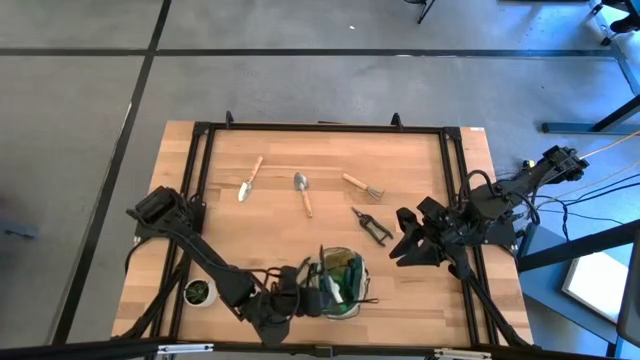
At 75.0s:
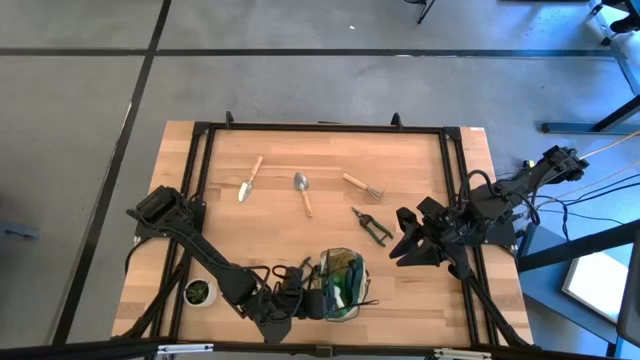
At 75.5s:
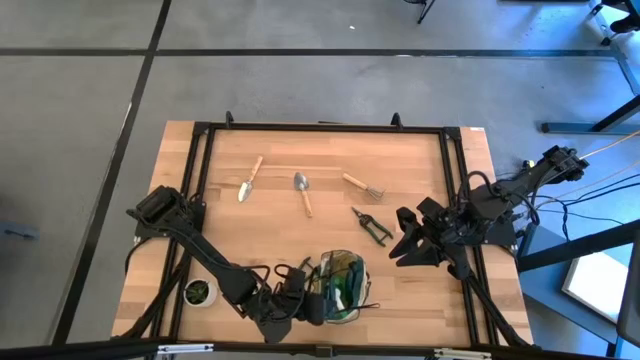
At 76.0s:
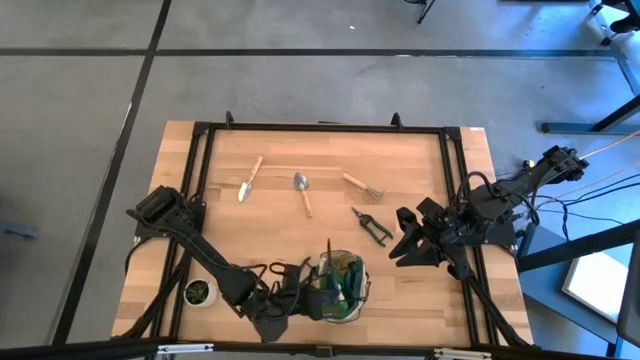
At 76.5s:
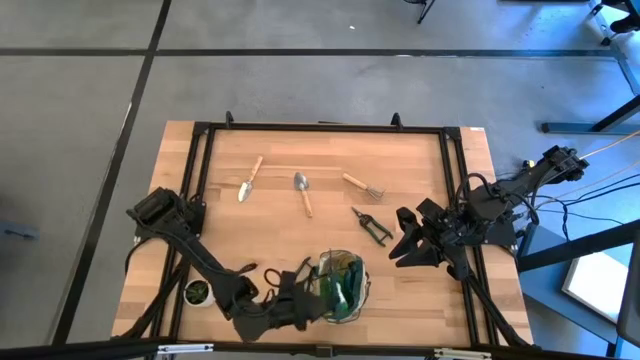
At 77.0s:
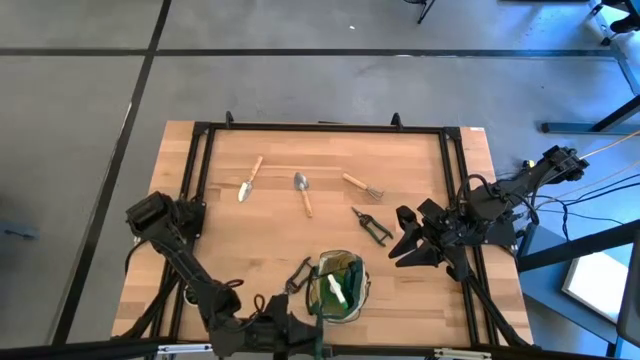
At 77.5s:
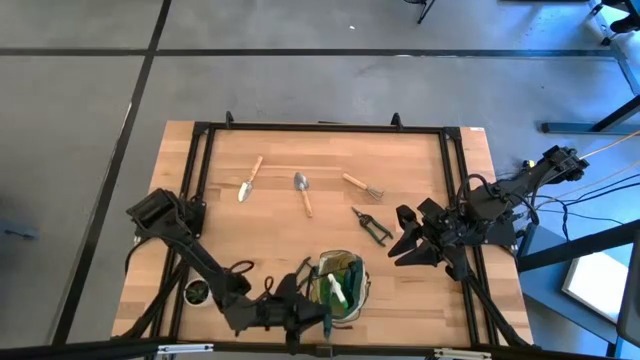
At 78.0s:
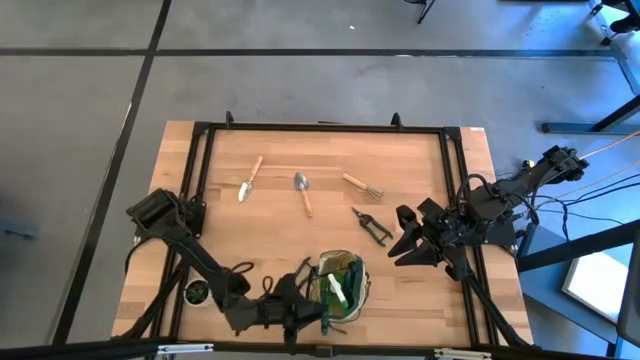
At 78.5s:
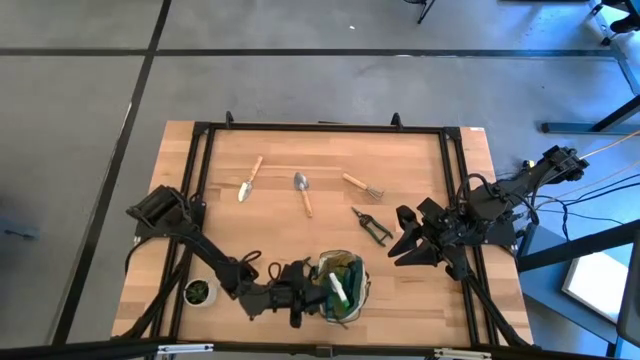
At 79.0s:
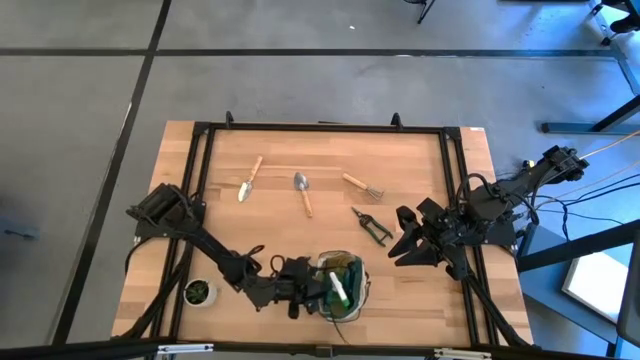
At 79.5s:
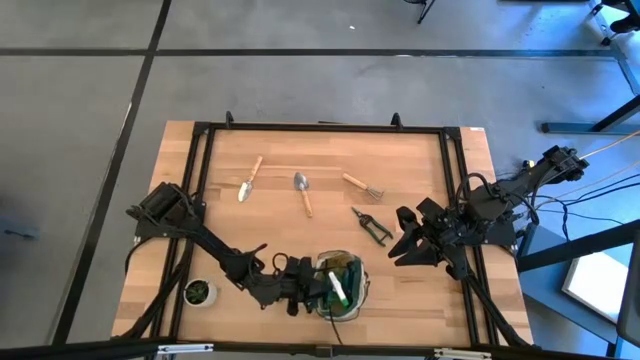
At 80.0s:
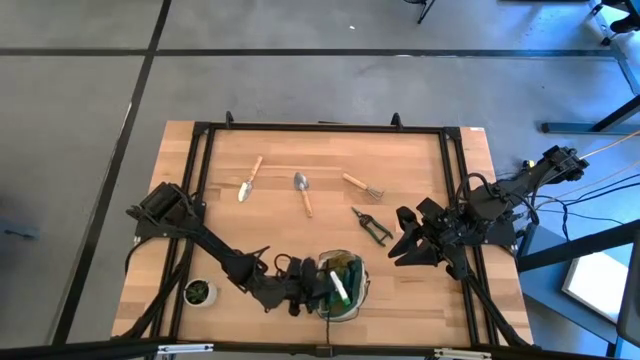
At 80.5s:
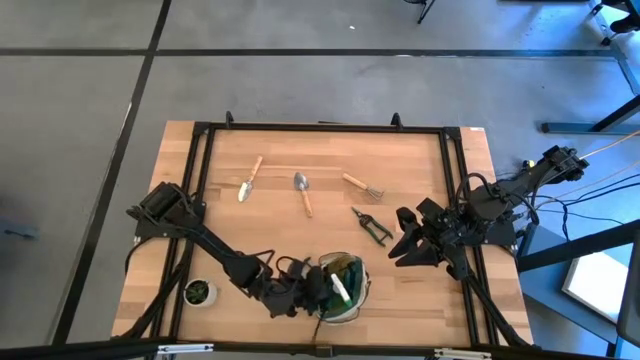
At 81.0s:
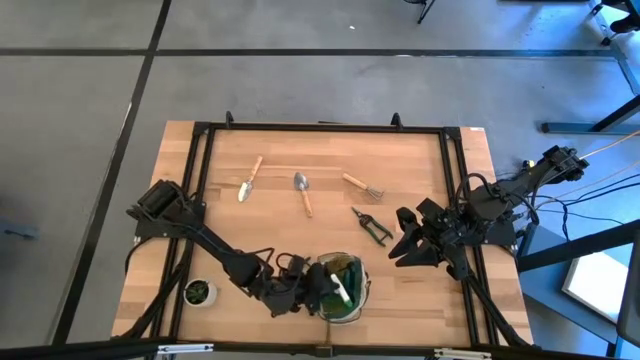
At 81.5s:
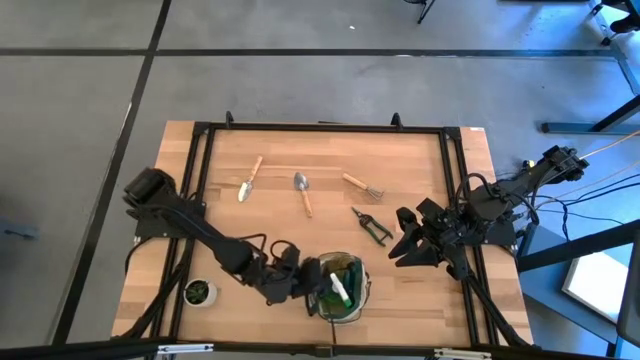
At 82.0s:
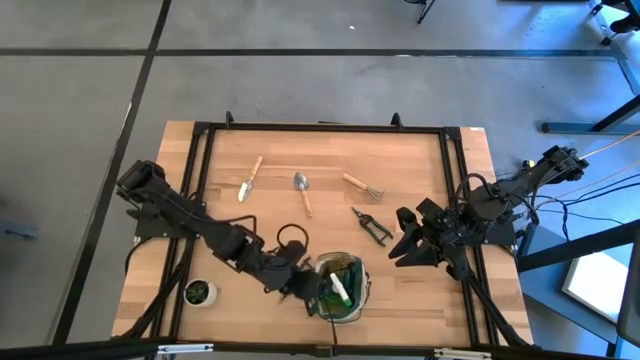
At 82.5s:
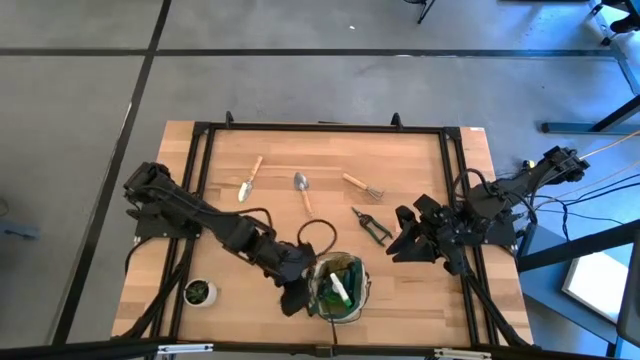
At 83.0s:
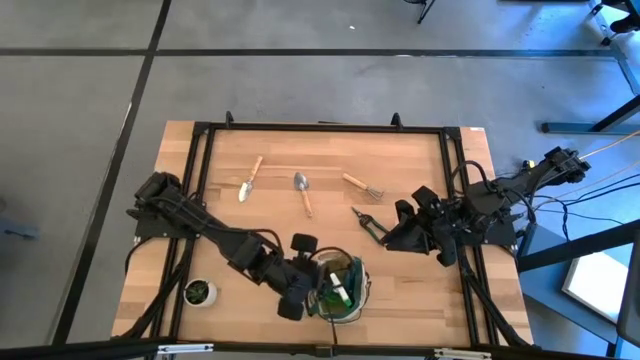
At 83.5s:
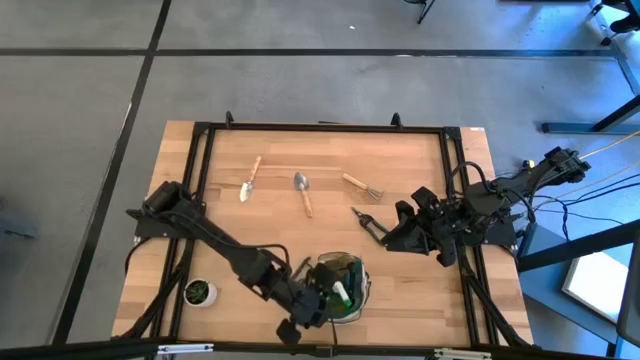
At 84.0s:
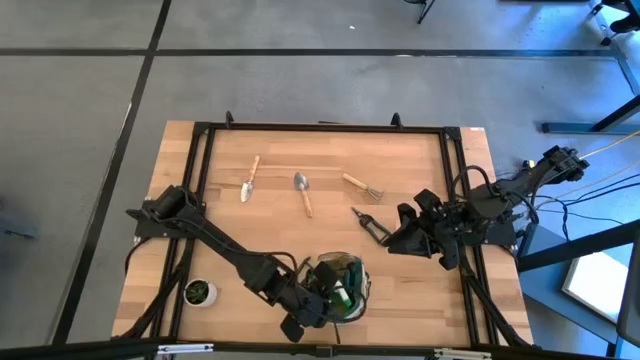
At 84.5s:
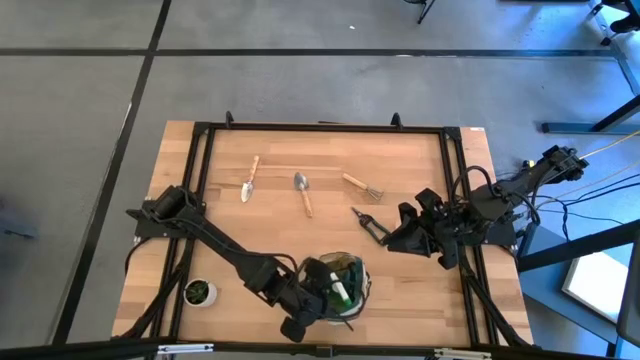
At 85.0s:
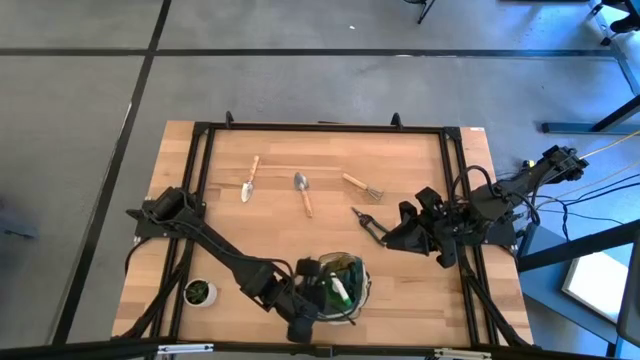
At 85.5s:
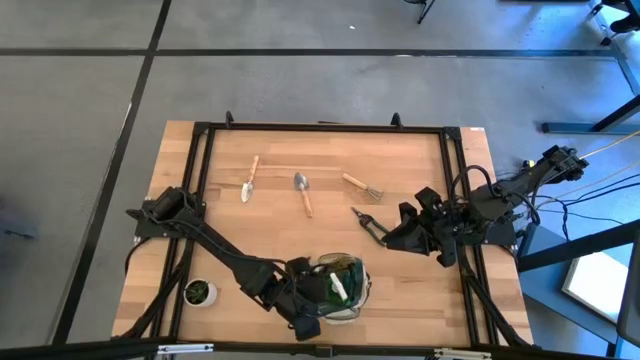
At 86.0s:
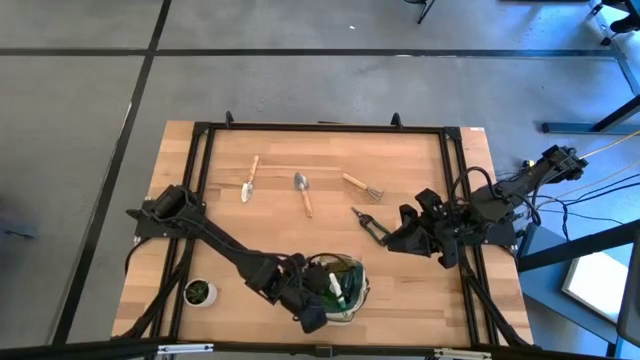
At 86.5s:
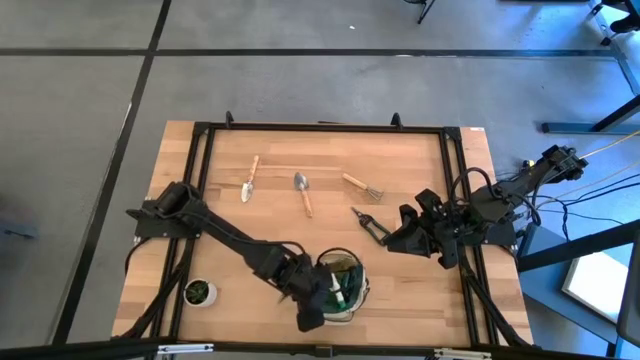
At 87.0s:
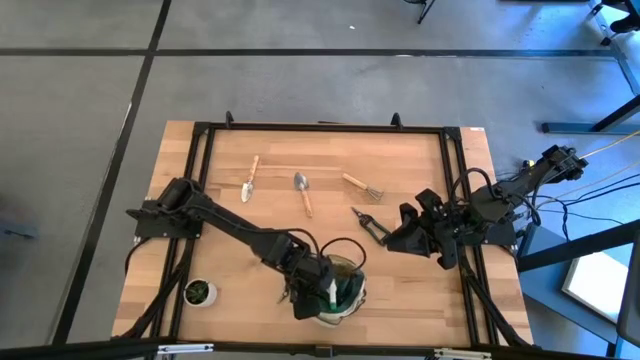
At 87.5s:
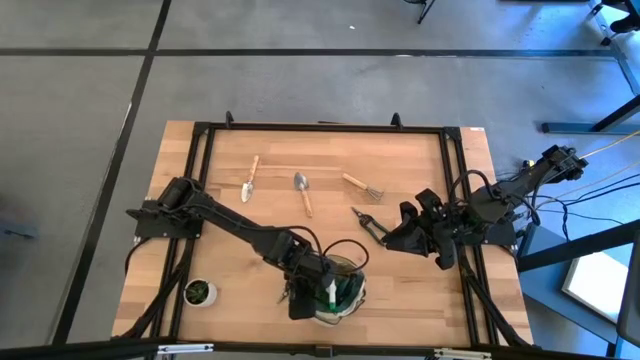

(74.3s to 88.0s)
Task: Pick & Place Garden tools in Gardening bag
Put the green shear scissors into the gardening bag
